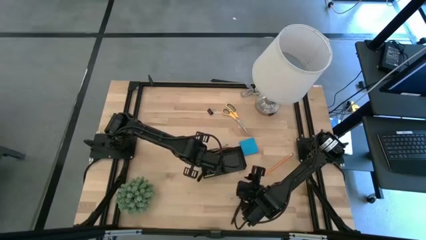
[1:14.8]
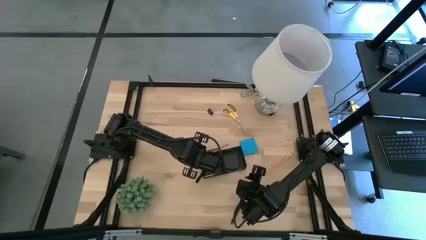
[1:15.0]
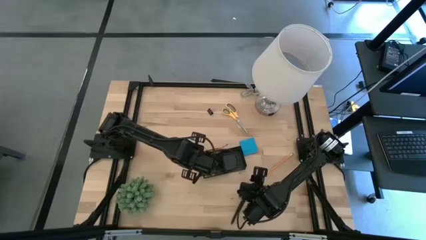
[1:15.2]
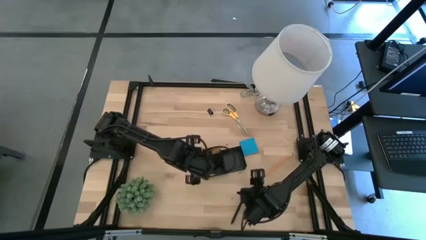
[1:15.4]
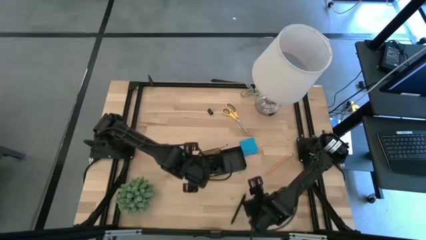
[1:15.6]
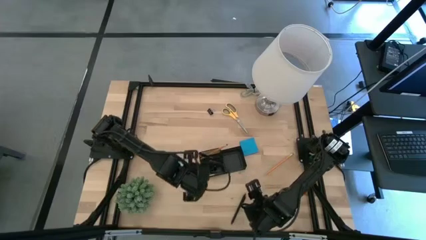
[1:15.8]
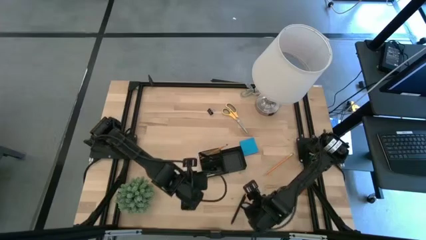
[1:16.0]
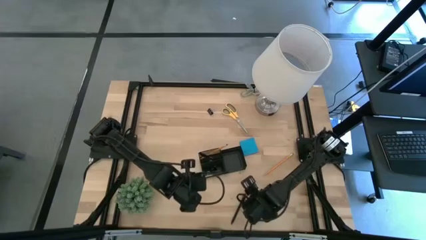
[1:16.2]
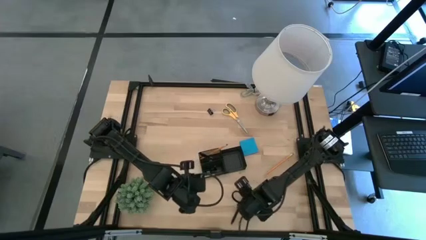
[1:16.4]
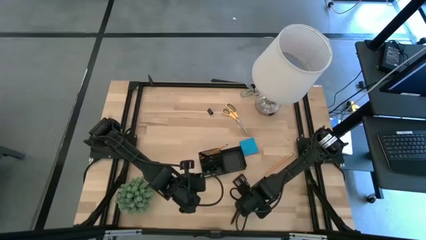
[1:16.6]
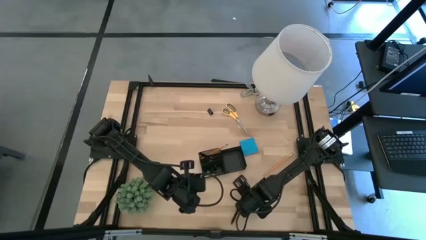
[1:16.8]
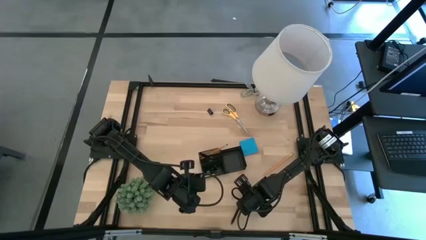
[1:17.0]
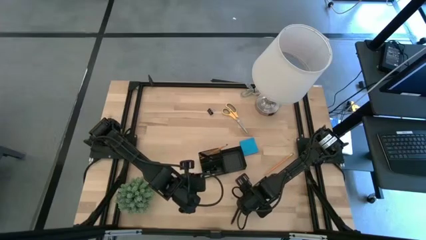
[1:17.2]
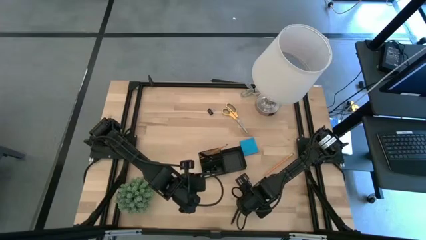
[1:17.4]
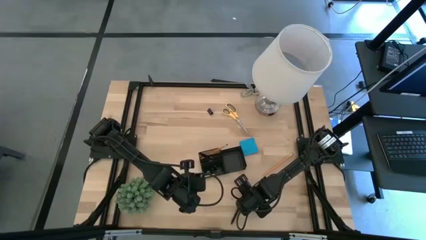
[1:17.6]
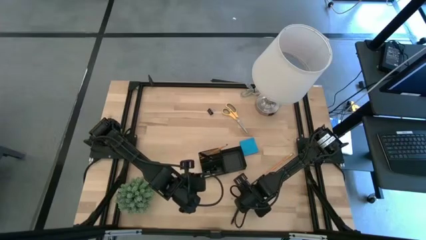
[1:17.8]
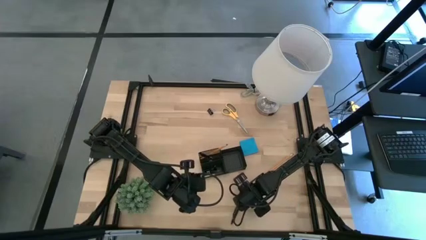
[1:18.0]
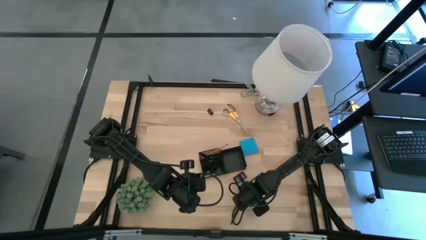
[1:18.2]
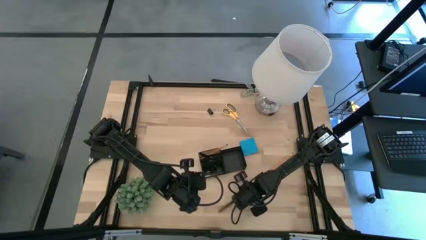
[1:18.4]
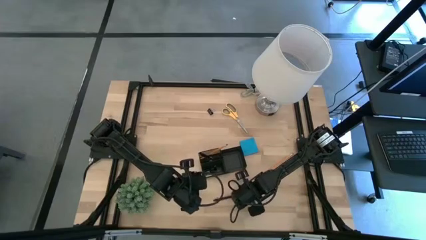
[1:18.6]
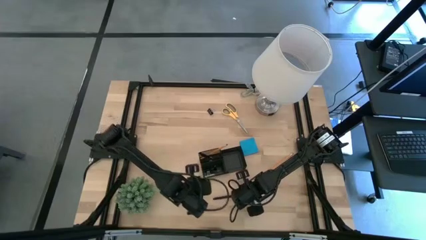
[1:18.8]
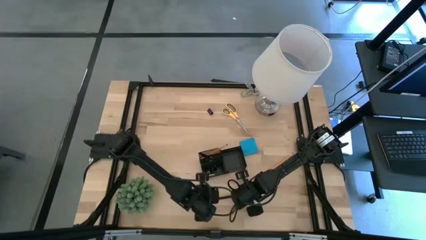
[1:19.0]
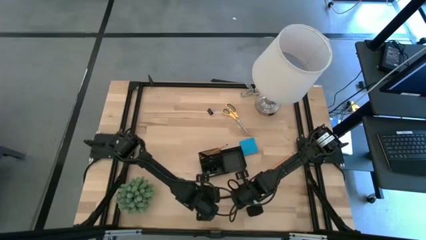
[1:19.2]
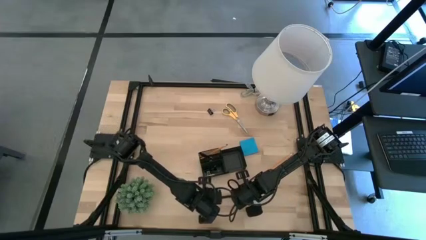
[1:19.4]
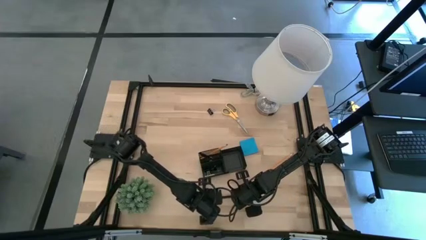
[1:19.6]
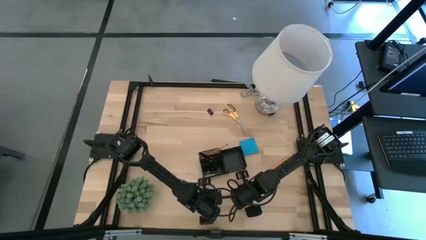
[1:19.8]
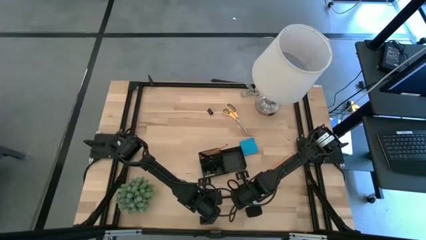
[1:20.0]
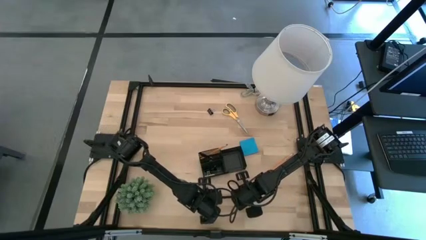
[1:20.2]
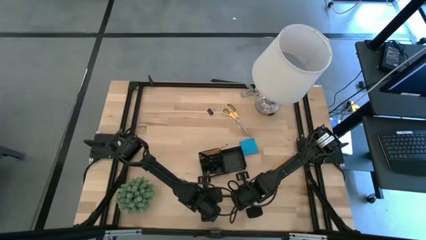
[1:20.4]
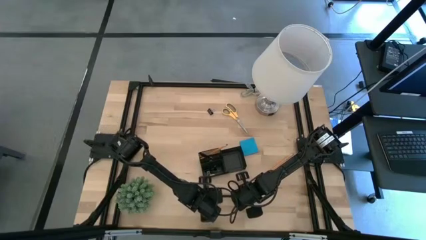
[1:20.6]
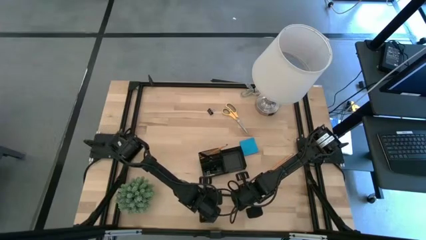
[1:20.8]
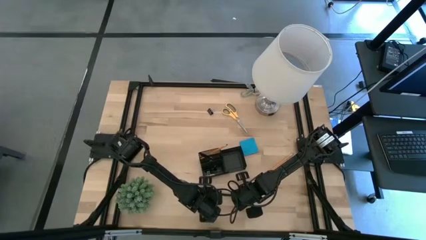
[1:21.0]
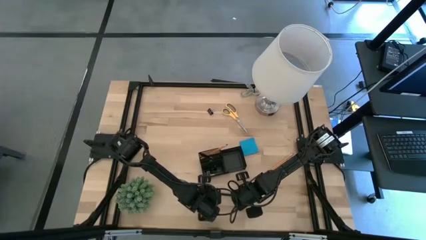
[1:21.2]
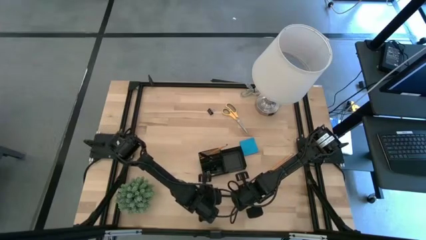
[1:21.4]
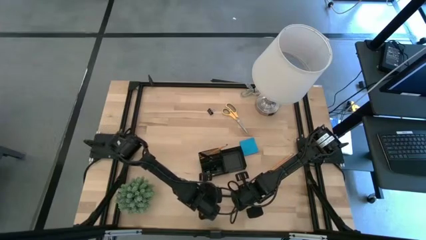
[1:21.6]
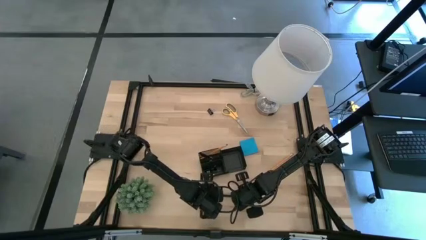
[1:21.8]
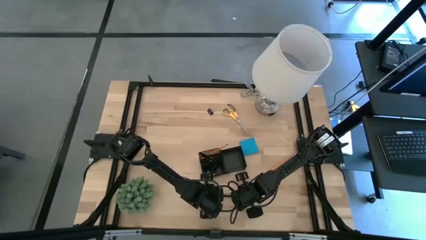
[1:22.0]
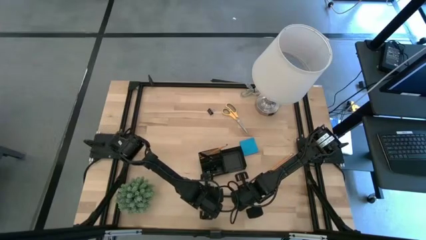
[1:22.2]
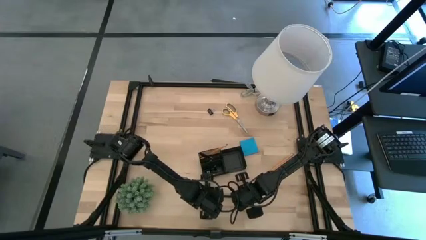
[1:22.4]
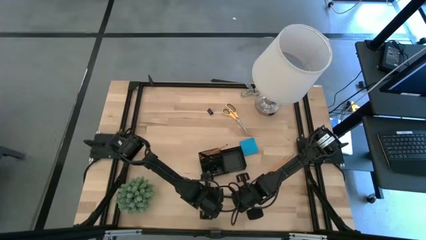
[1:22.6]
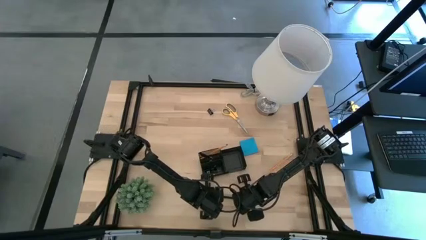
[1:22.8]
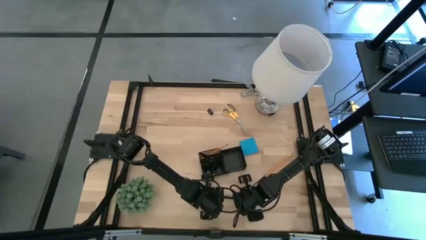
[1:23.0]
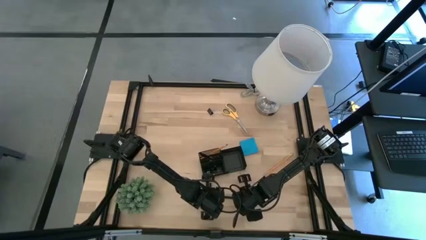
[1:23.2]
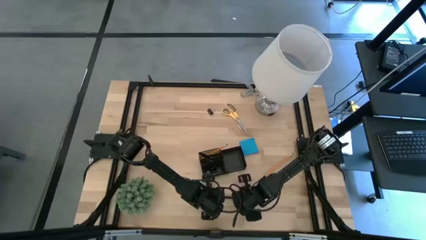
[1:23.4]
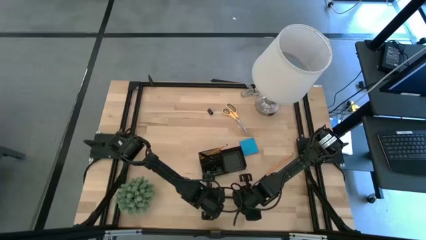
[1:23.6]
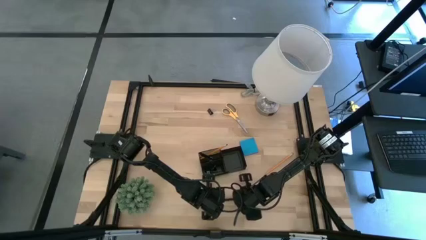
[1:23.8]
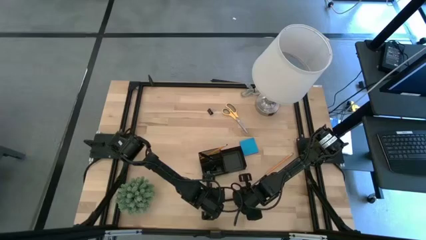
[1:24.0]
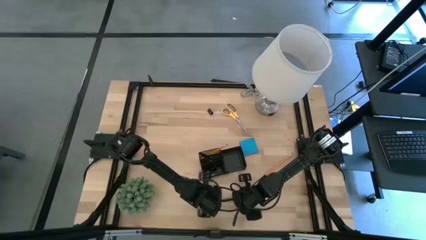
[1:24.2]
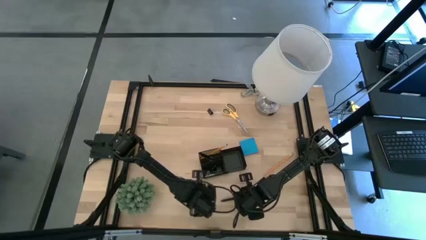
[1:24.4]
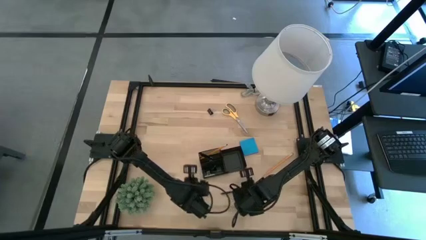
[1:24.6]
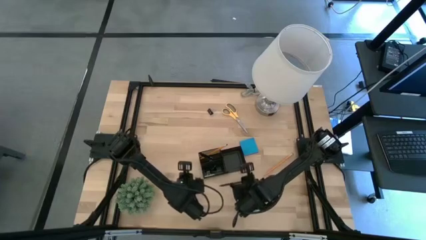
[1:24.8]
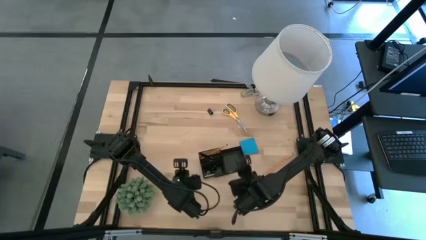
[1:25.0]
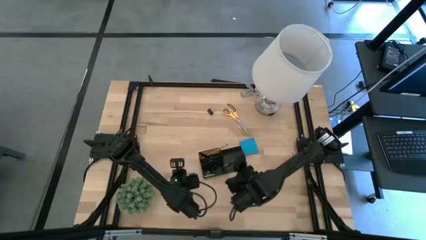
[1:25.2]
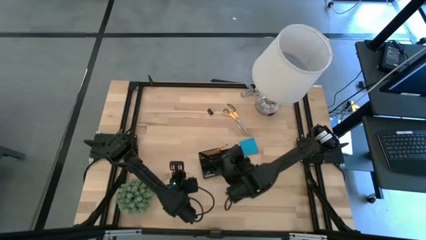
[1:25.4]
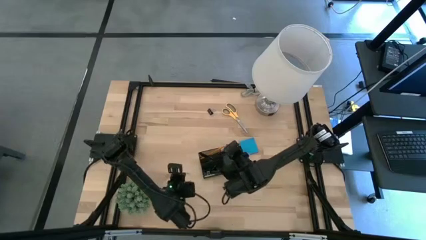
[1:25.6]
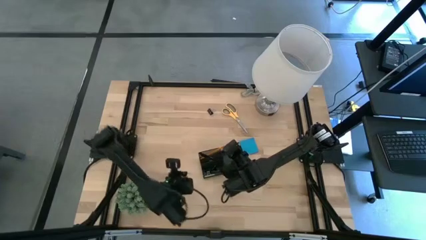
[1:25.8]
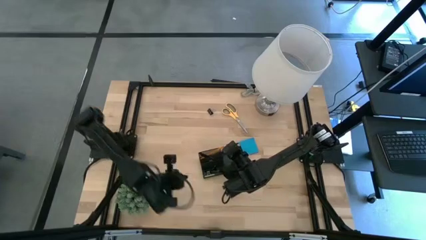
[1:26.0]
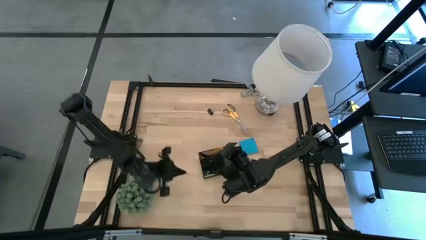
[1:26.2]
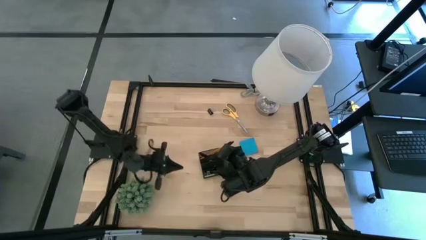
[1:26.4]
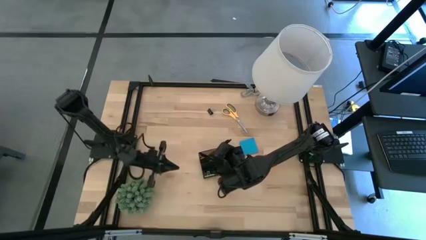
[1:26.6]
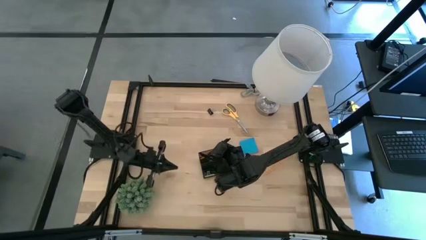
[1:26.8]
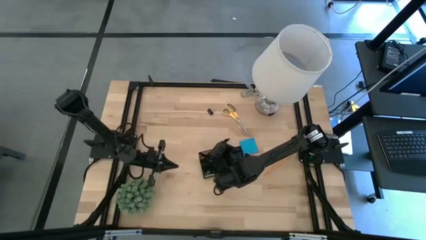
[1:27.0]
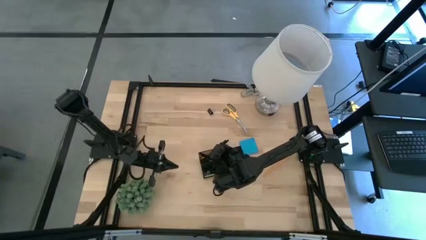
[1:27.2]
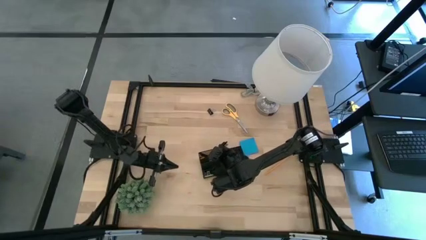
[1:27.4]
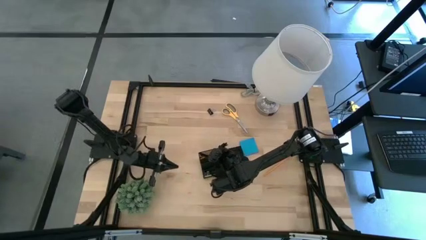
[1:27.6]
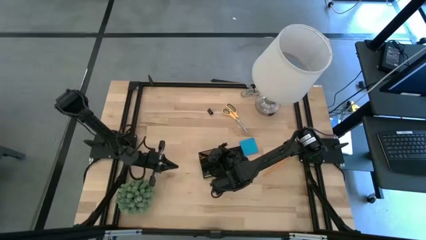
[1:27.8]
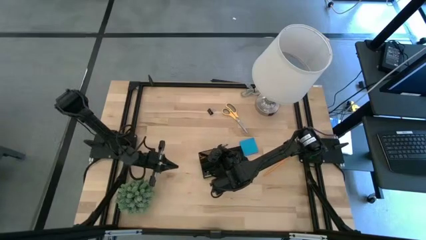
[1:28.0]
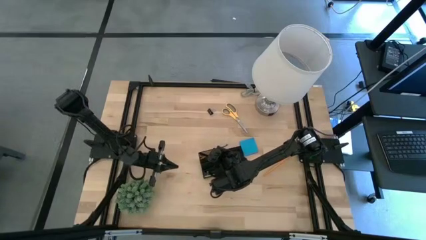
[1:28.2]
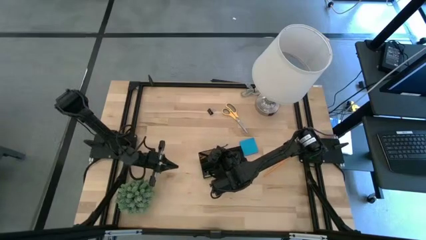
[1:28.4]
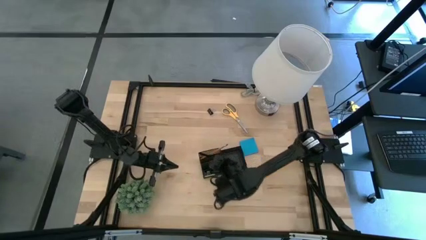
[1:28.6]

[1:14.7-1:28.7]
Task: Pick and place office supplies into organizer
Put the black pen into the desk organizer

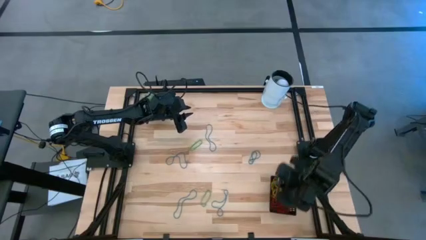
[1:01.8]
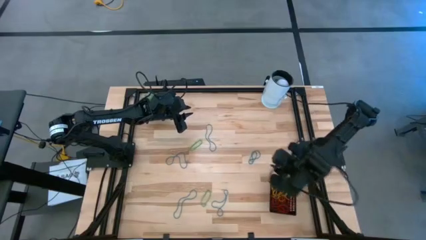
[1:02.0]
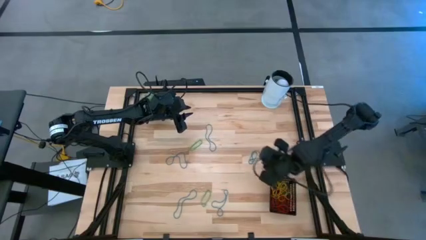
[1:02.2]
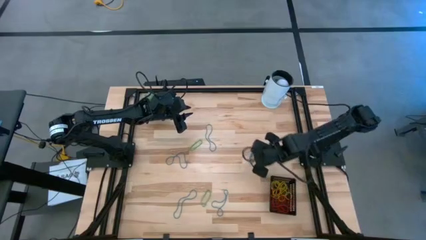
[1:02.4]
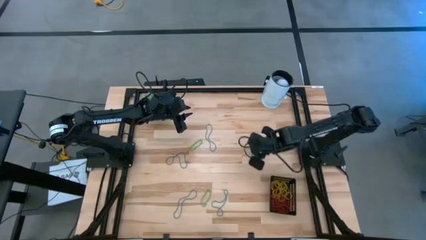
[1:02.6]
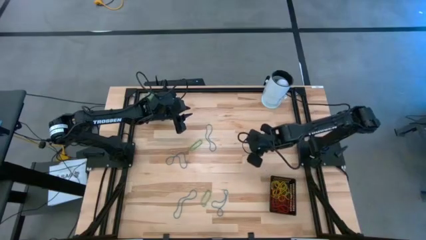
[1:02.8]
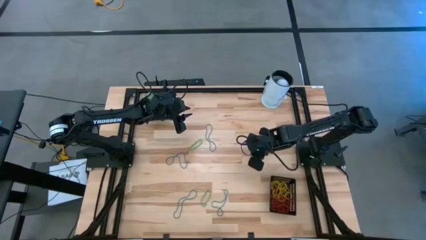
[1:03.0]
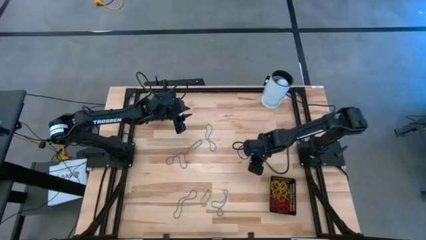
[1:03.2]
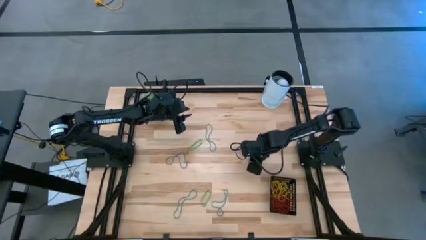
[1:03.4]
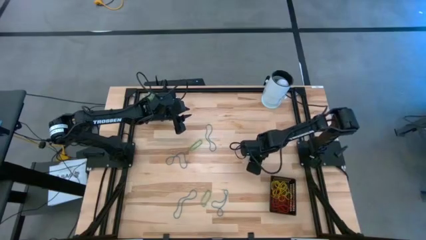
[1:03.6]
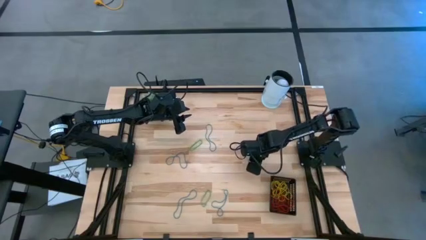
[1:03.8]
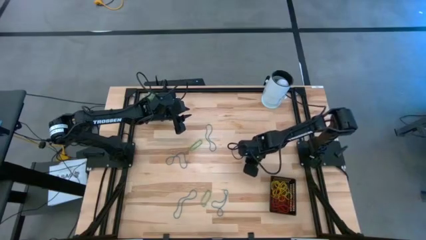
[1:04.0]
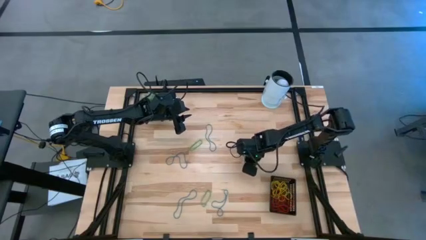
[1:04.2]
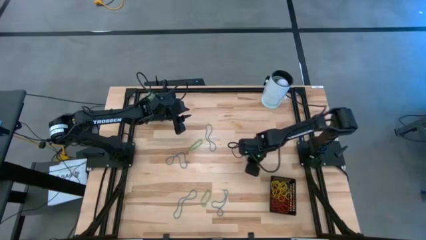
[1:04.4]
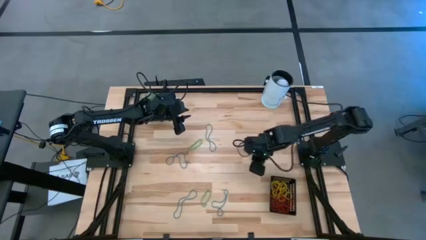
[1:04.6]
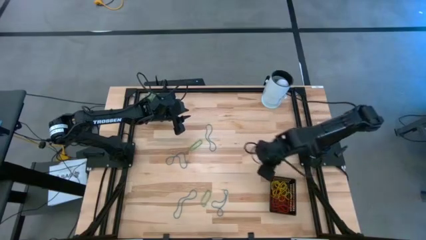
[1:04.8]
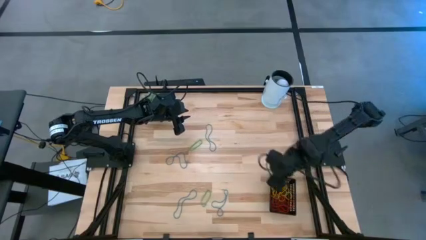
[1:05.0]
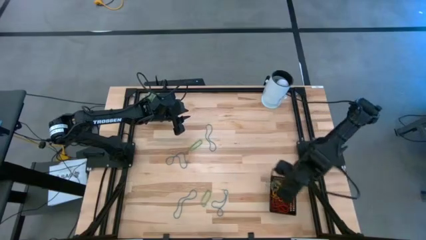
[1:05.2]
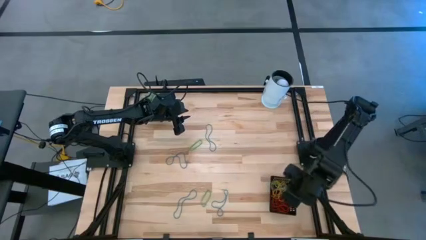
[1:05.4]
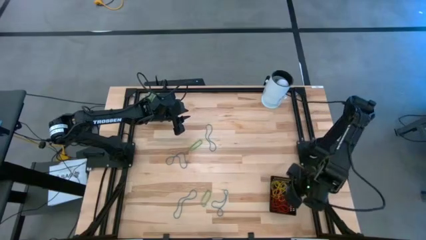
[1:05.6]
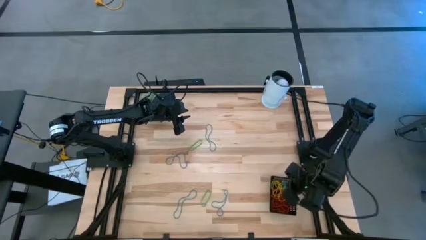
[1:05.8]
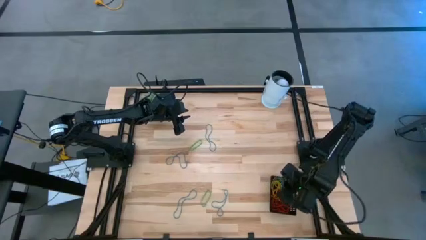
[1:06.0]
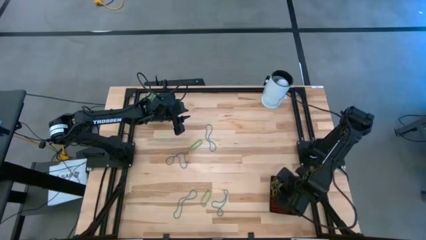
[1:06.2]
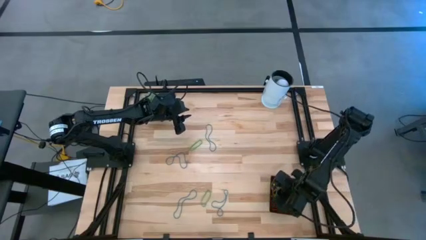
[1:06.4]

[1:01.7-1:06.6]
Task: Pick and place items into bin
Put the right blue rubberband into the black basket
